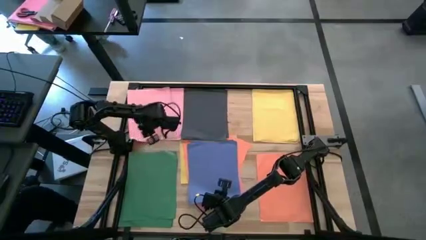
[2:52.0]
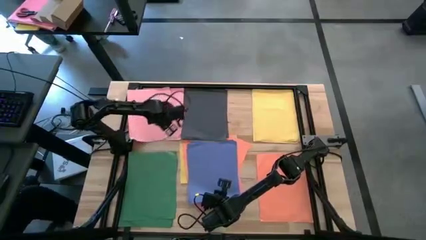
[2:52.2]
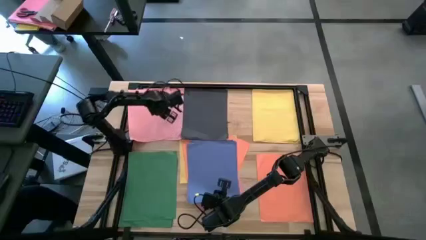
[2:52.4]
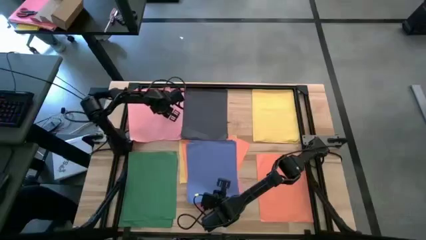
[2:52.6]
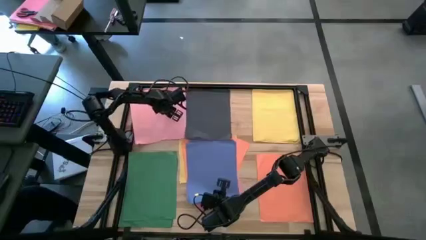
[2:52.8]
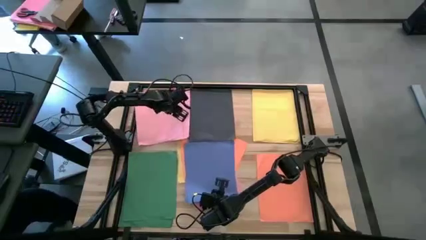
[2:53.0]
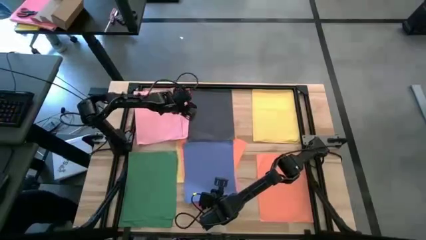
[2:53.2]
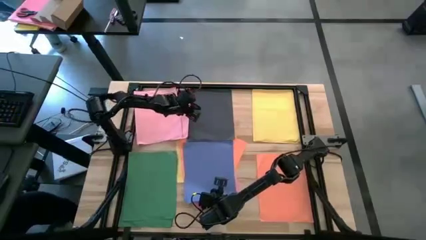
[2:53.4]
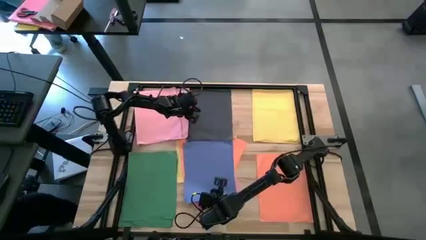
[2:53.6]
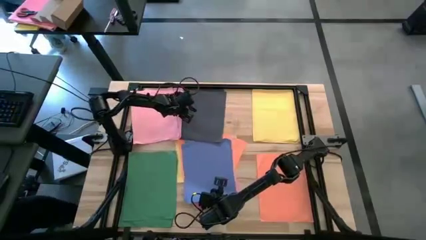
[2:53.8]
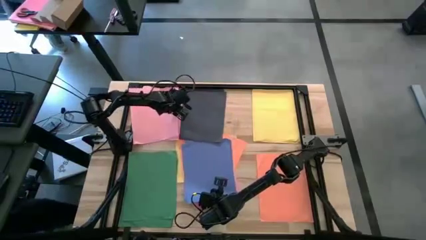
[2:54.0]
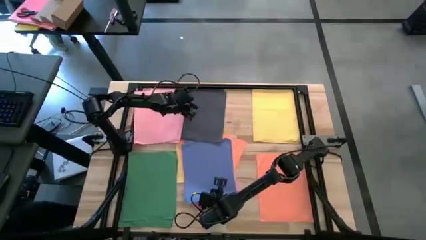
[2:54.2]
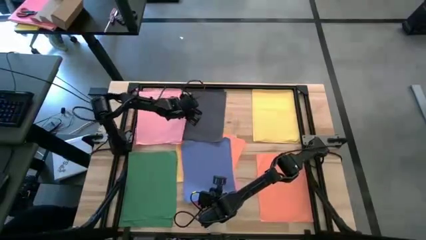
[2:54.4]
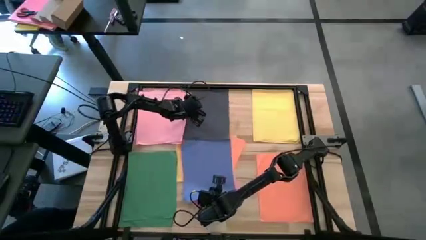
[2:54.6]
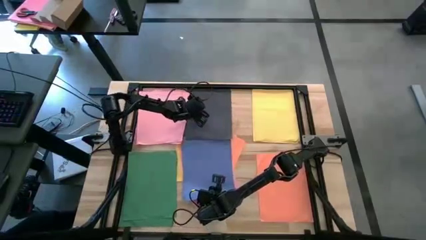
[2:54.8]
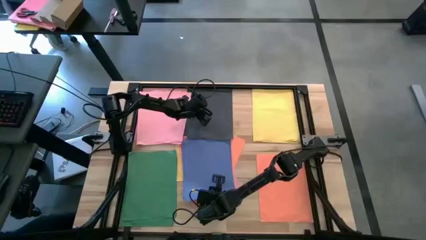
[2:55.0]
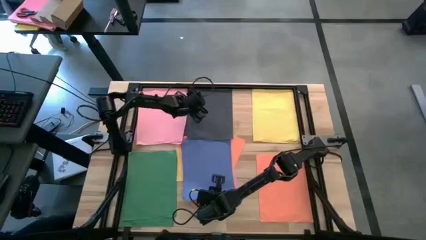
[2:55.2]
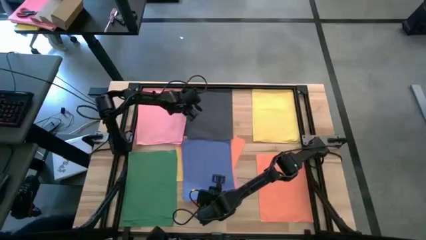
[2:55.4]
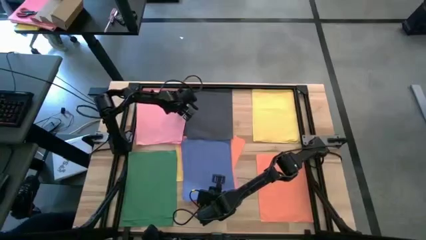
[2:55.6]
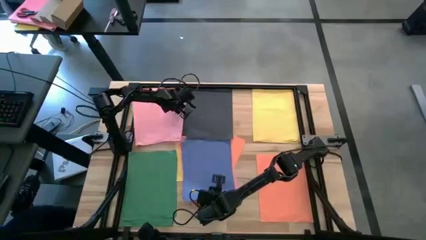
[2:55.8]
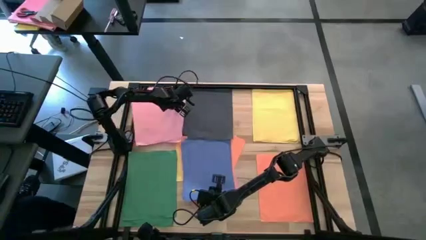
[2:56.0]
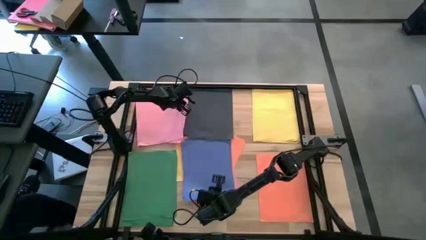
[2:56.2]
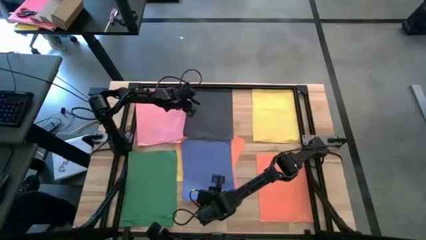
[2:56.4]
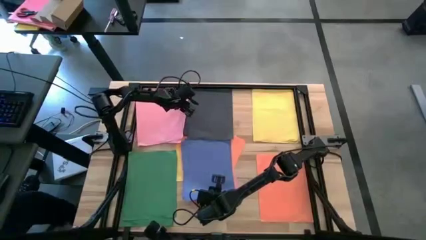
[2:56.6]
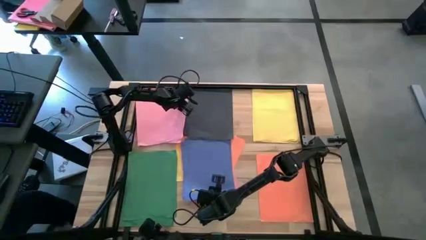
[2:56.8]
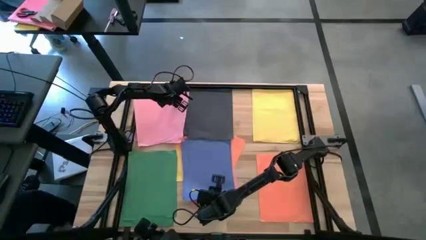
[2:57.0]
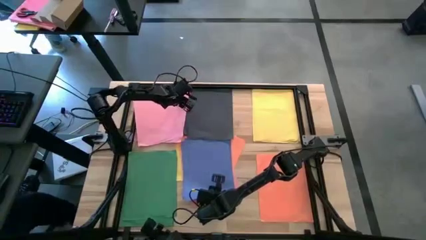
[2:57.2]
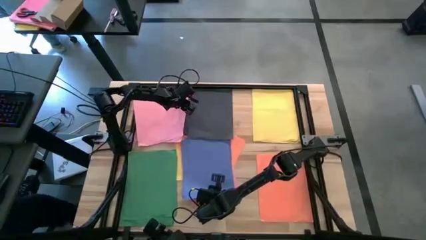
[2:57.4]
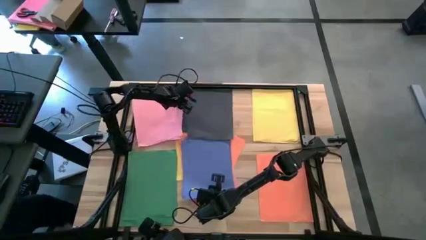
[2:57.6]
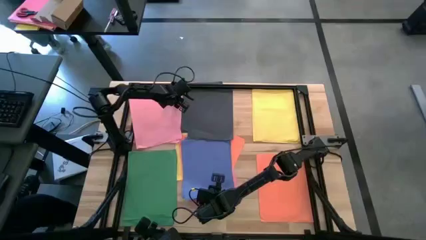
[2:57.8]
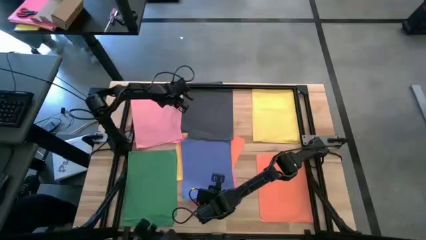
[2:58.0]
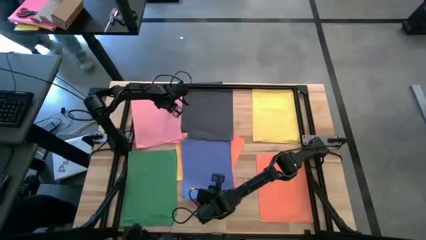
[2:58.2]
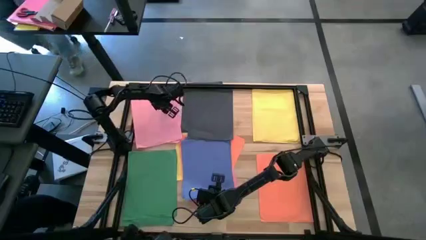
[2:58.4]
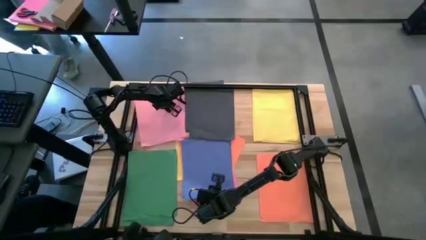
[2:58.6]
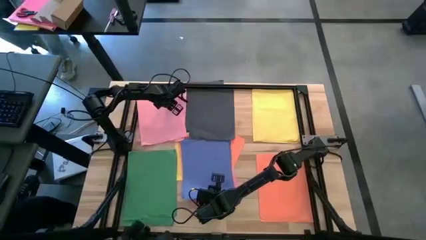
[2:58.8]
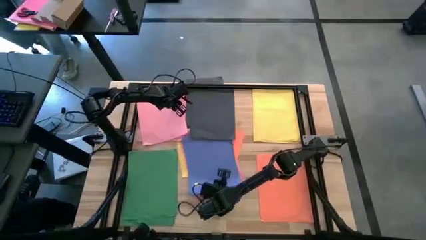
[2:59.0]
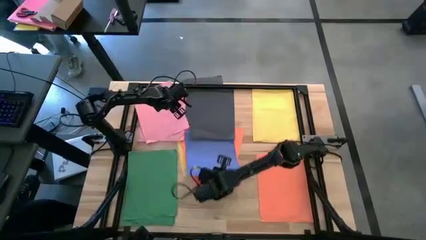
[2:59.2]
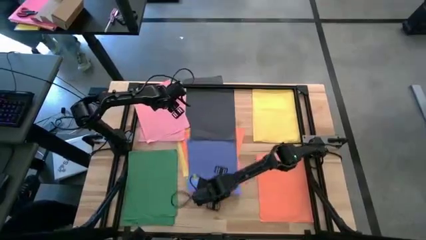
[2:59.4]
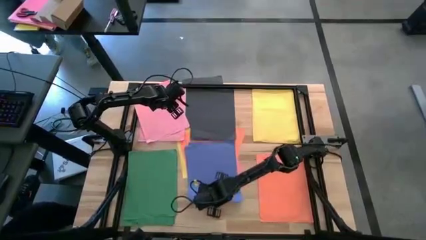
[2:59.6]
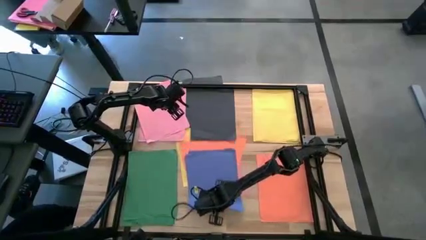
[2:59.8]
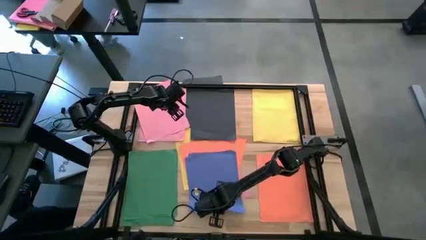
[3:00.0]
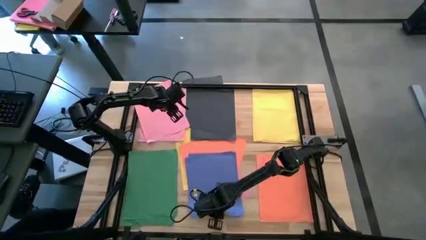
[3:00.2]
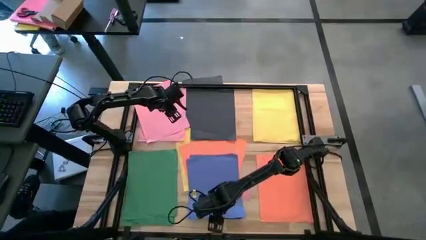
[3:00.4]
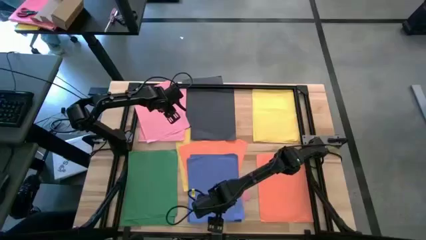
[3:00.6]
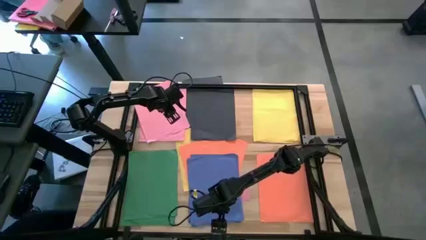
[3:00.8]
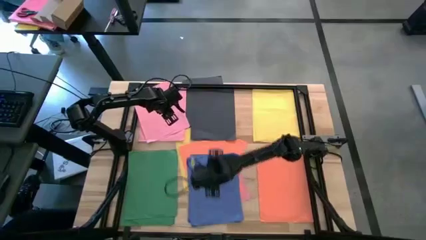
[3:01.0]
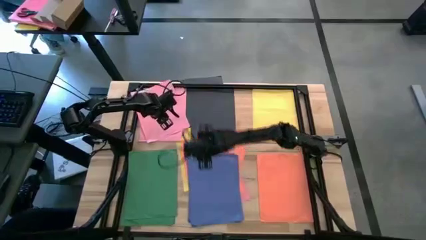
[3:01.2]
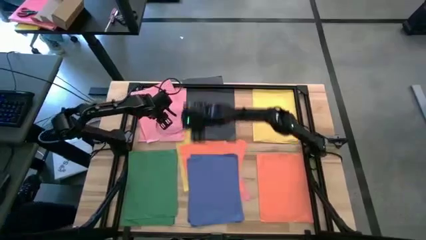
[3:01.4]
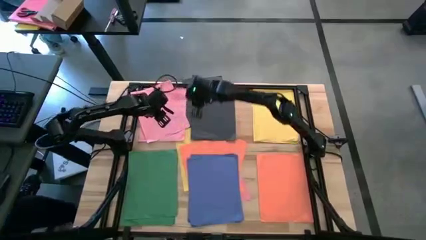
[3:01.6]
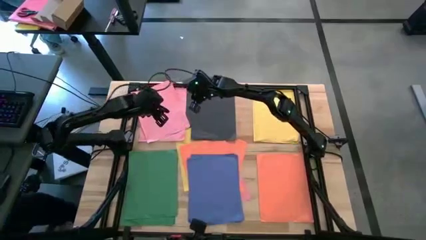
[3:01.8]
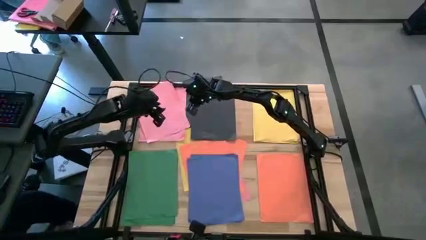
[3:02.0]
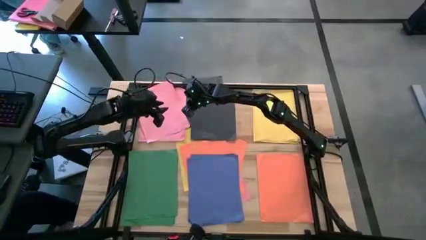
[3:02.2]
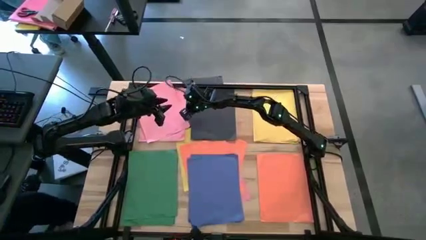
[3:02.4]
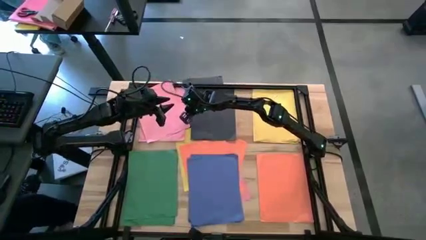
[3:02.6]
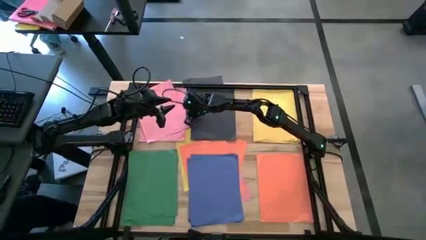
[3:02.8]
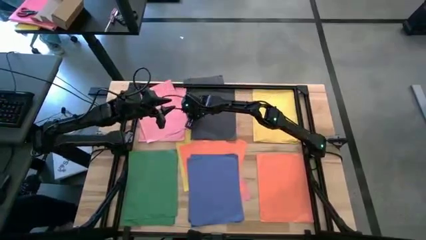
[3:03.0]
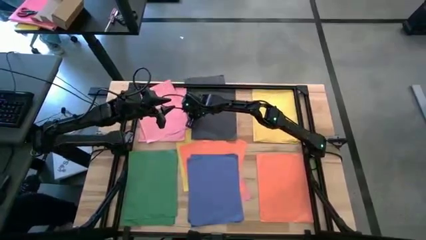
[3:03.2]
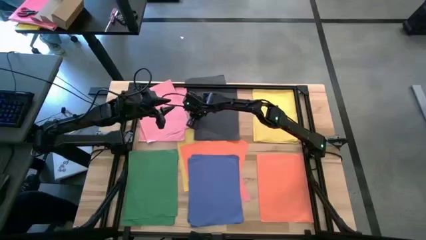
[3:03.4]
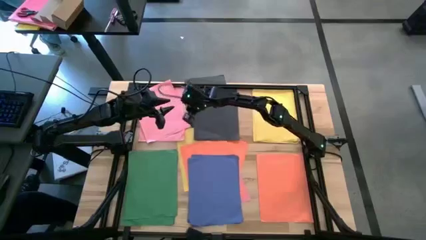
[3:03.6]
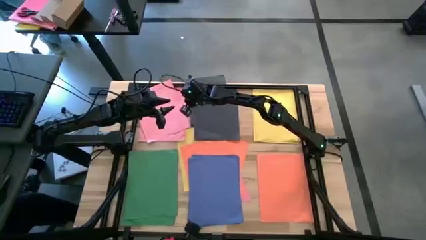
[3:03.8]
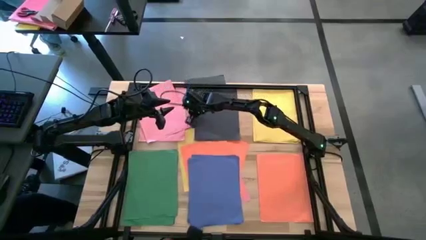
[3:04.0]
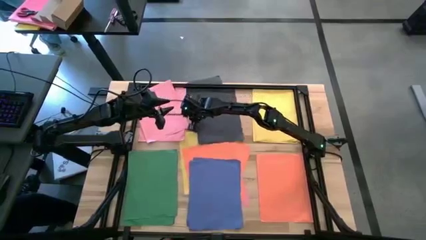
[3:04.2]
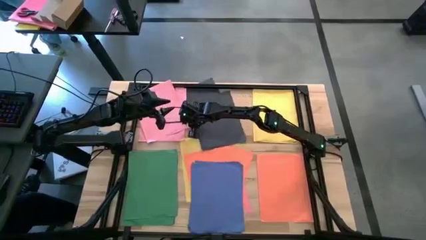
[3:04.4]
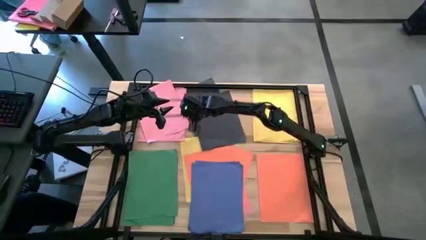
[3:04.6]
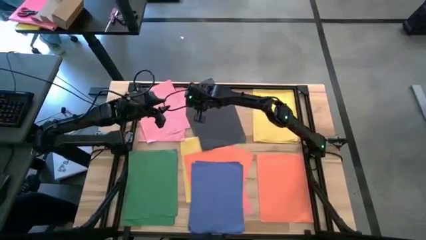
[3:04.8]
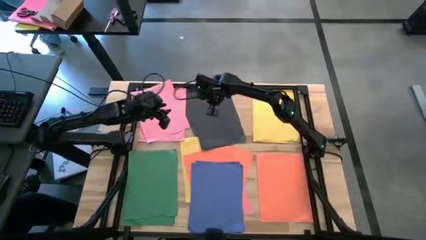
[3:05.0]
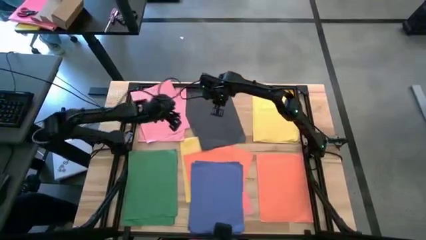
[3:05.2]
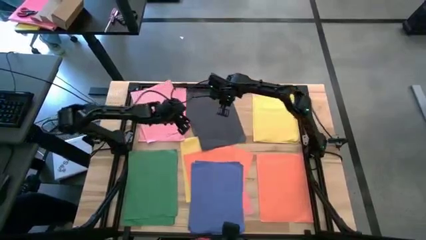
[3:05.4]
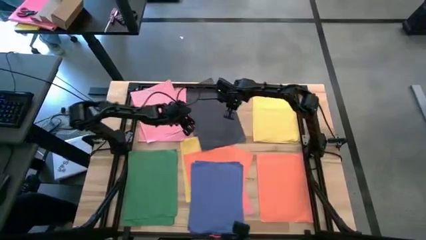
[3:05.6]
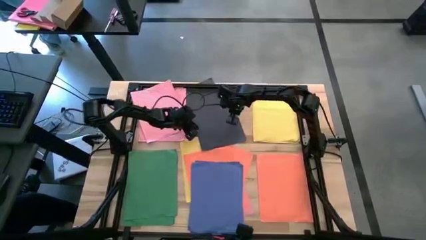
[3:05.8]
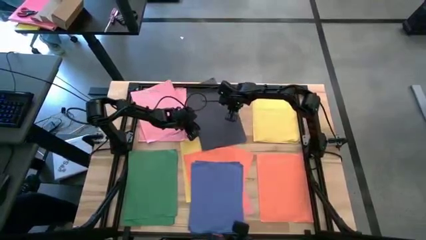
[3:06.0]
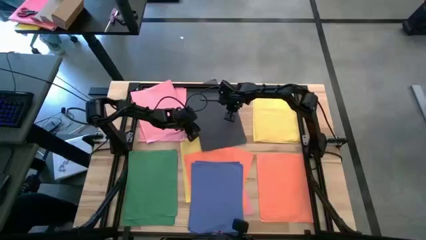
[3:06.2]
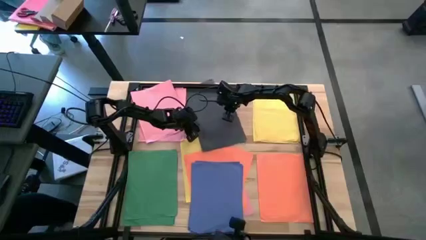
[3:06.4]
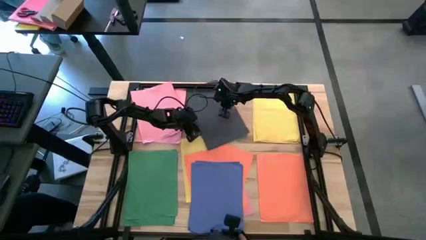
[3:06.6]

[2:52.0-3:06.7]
Task: Organize paper
Adjust the stacked colored papers
